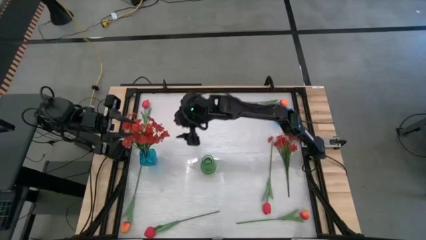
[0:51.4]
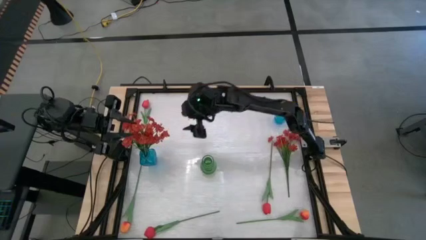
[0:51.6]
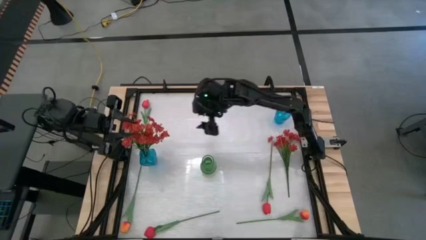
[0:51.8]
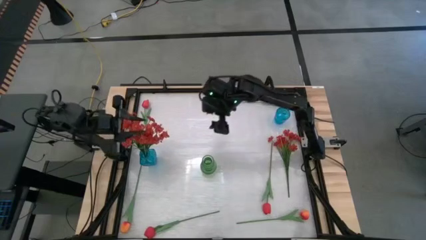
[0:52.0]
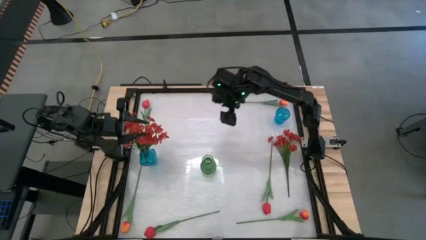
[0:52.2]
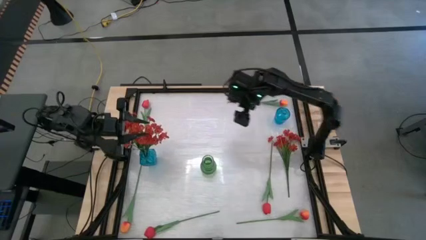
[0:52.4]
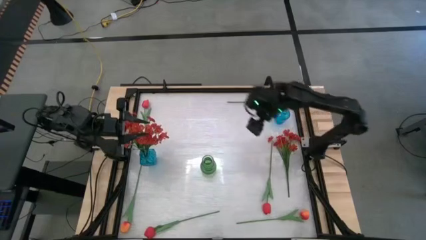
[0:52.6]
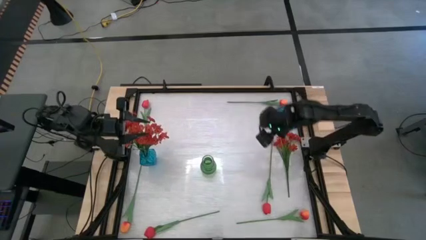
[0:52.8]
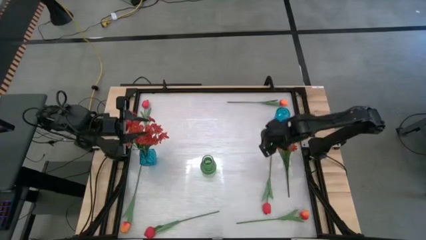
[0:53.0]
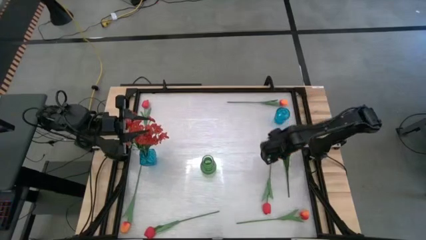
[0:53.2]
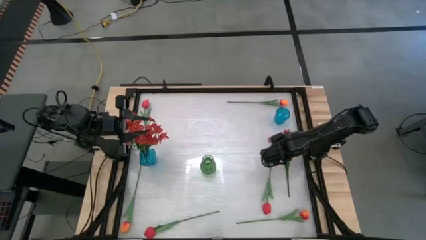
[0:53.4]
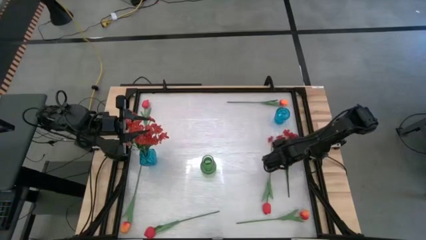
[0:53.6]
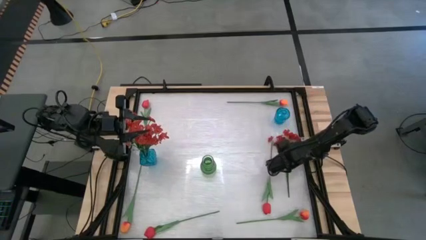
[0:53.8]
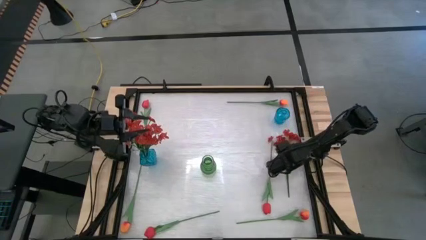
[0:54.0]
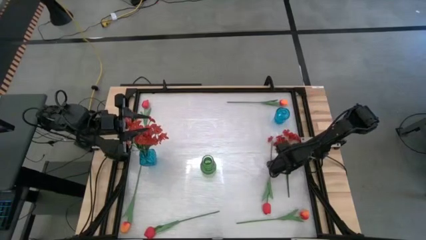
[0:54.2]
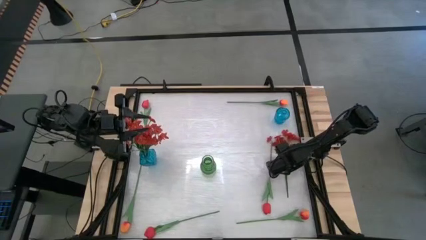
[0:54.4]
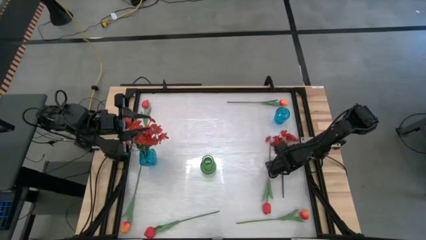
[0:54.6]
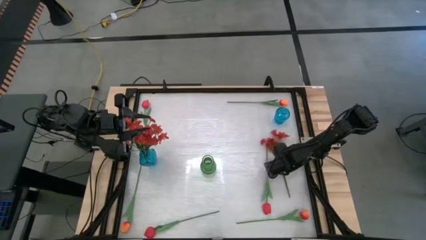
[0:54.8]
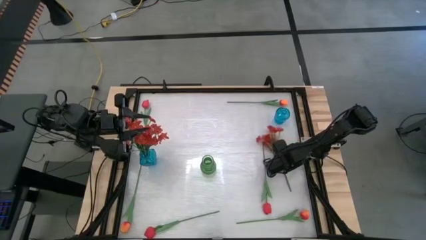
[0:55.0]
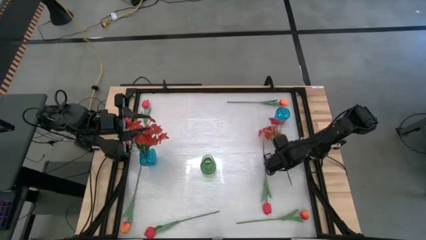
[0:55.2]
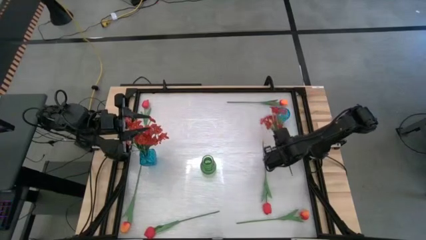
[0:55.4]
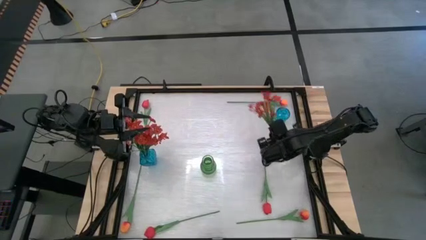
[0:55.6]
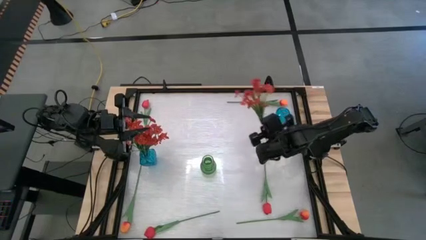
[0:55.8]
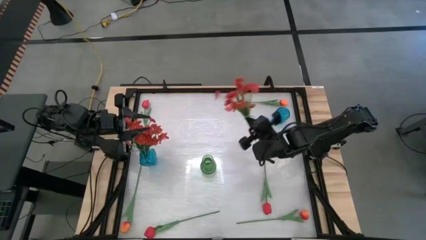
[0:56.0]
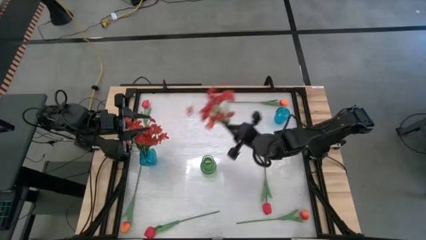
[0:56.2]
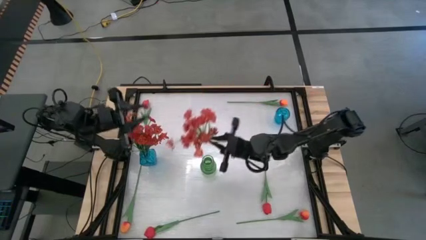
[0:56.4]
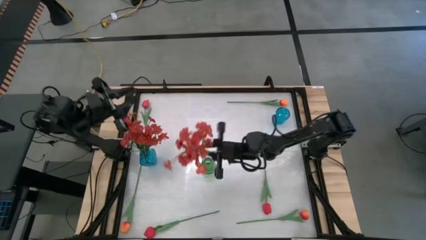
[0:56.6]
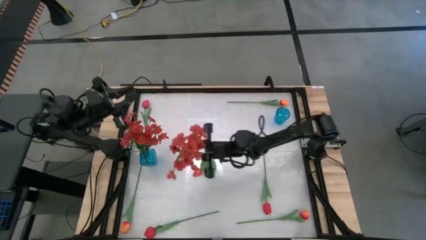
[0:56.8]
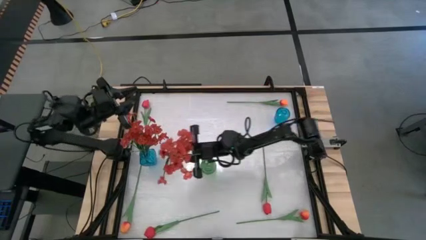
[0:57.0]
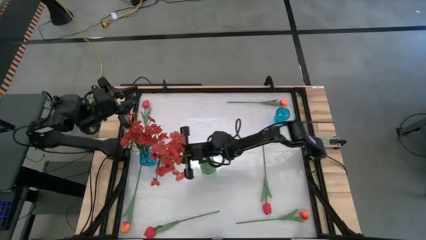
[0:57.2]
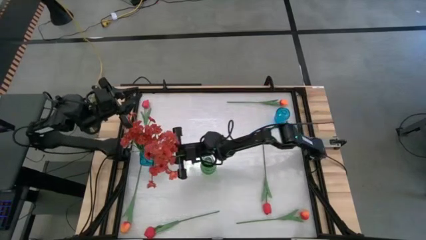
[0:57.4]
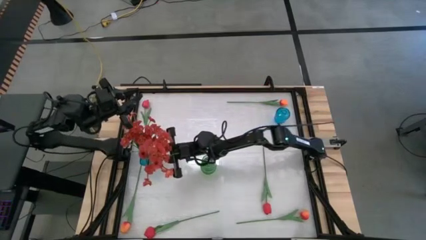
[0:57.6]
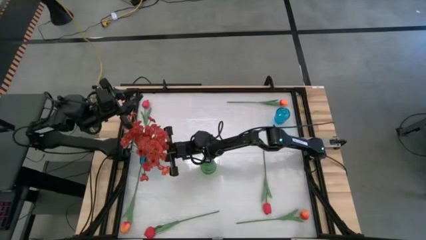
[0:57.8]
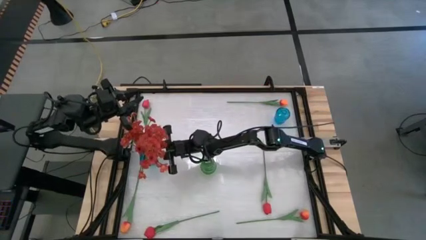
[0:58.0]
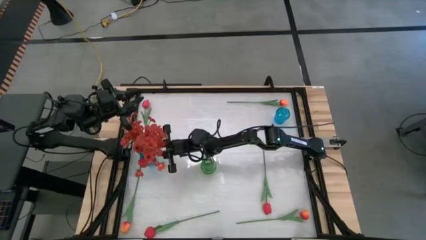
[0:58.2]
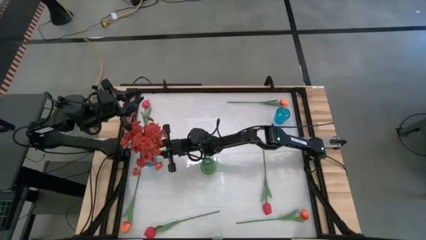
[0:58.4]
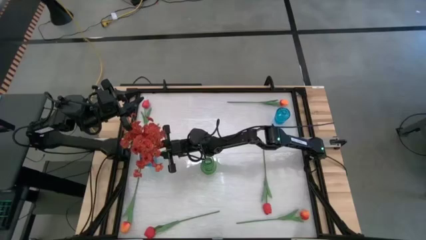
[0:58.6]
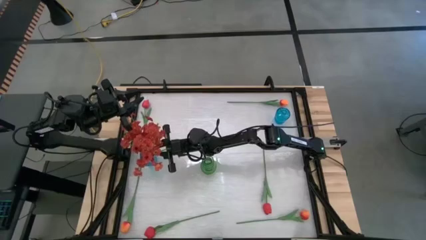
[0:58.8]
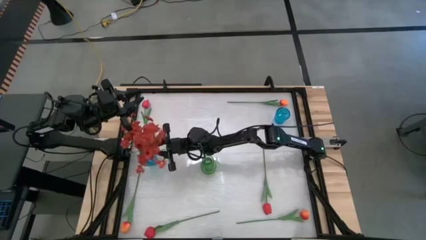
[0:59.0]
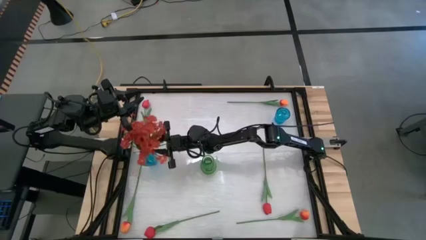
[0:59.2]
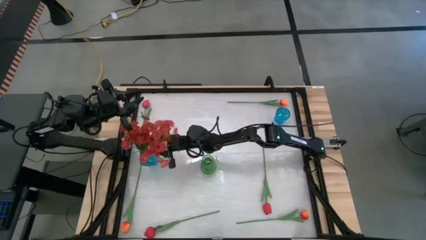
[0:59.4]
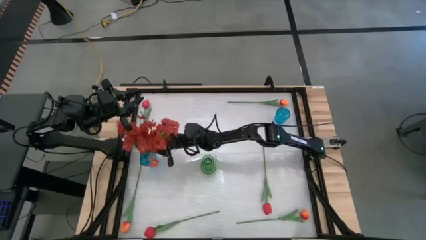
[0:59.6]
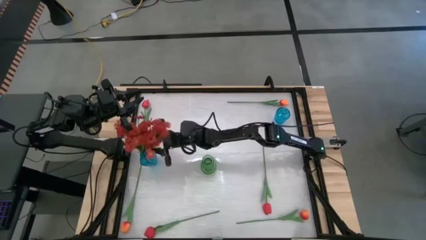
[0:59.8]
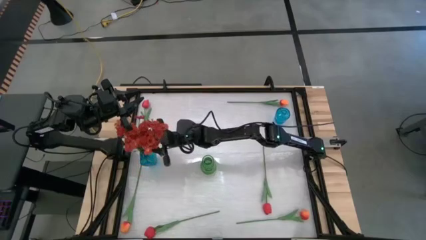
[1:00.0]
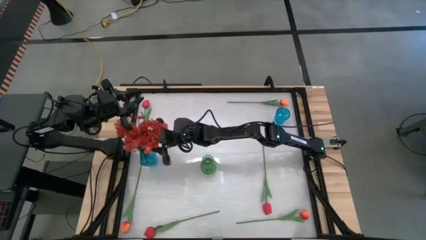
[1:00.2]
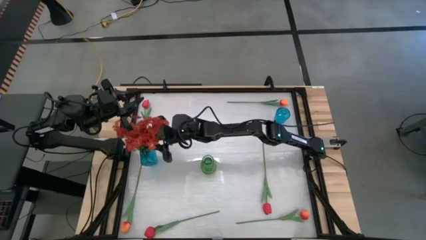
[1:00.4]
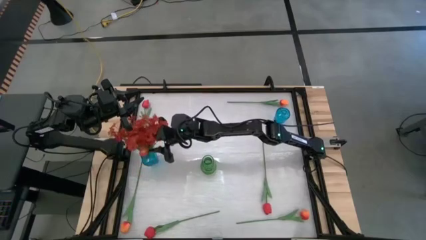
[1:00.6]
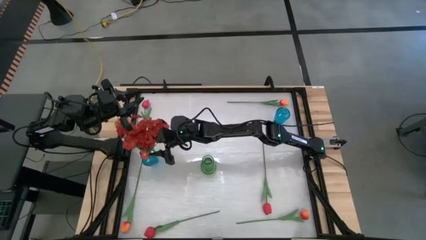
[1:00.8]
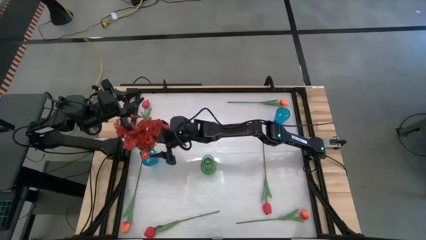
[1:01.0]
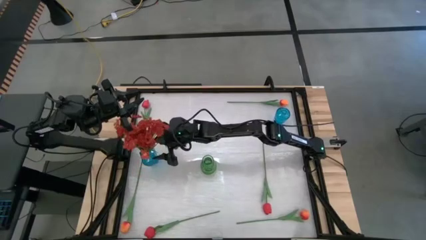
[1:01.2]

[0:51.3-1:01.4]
Task: Sort flowers into vase by color
Put the red flowers into the left blue vase

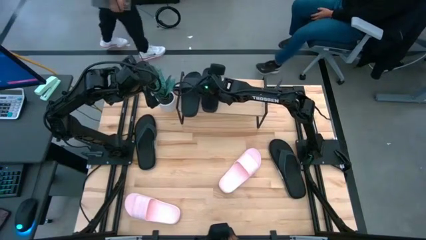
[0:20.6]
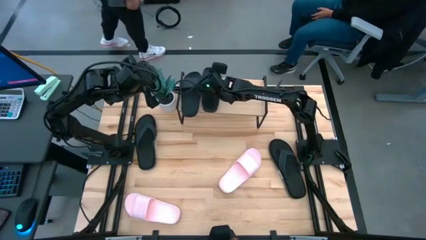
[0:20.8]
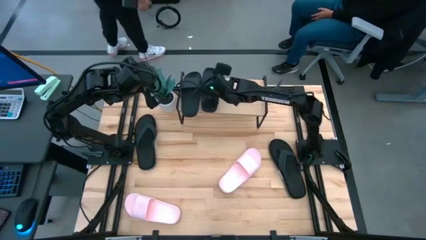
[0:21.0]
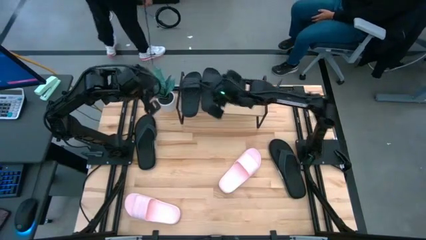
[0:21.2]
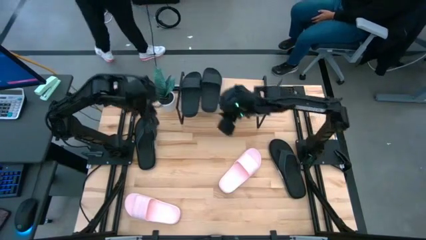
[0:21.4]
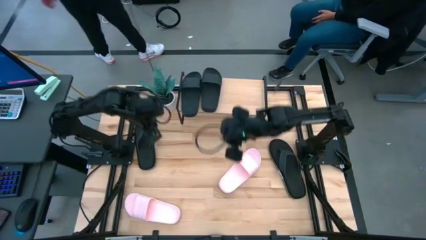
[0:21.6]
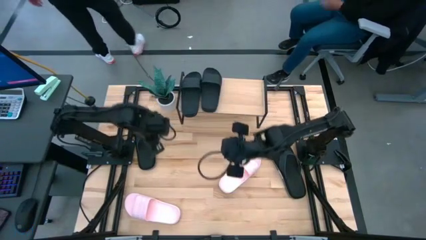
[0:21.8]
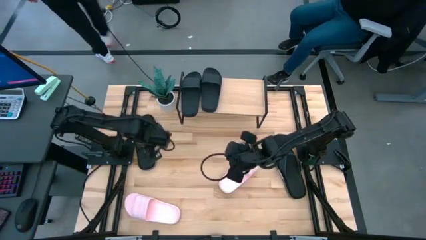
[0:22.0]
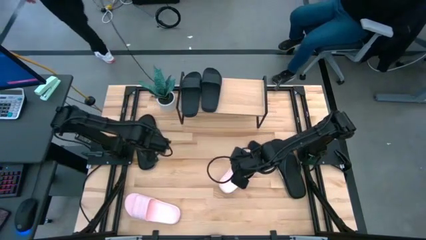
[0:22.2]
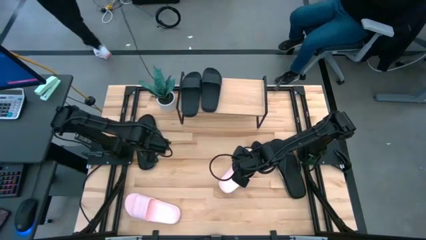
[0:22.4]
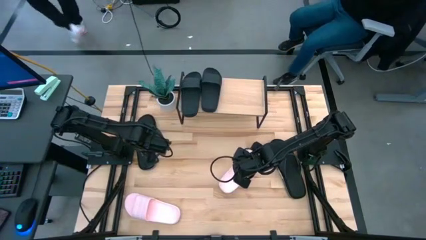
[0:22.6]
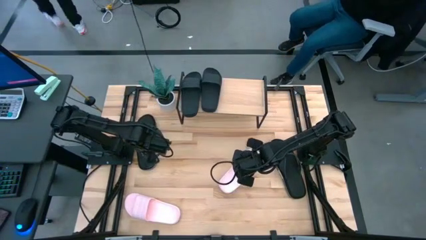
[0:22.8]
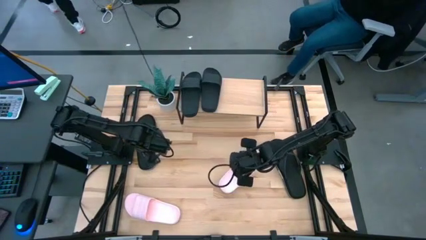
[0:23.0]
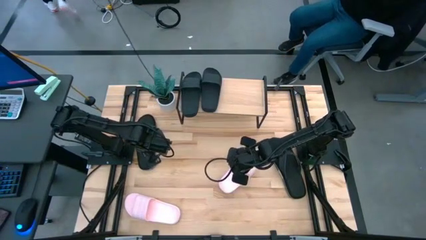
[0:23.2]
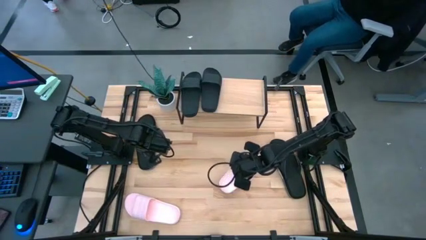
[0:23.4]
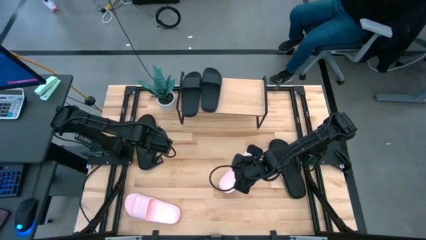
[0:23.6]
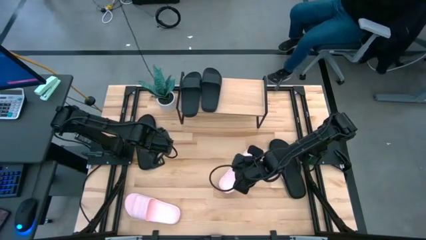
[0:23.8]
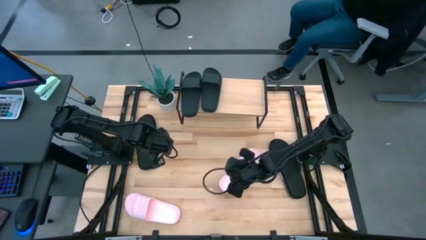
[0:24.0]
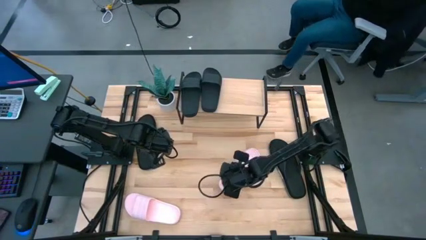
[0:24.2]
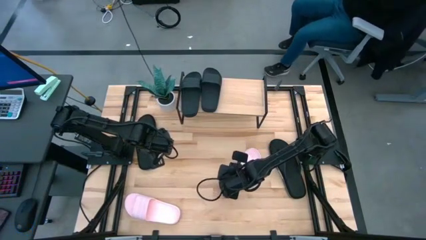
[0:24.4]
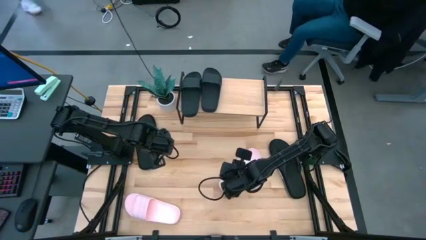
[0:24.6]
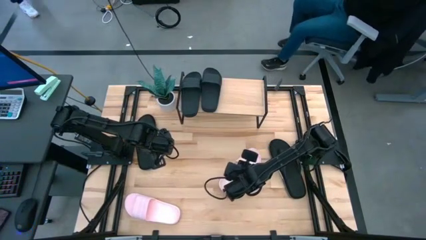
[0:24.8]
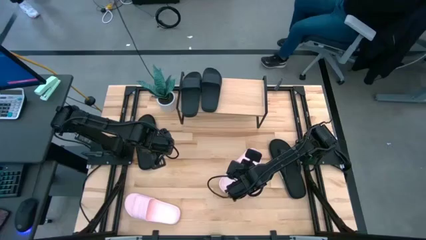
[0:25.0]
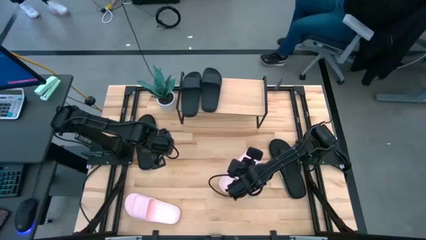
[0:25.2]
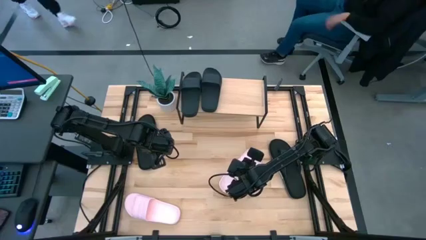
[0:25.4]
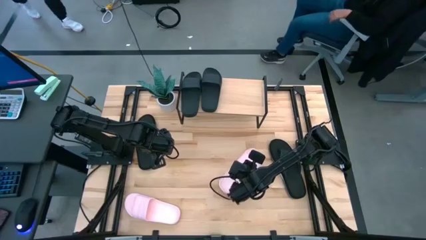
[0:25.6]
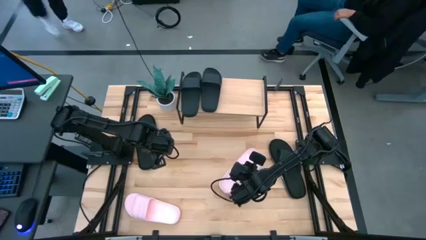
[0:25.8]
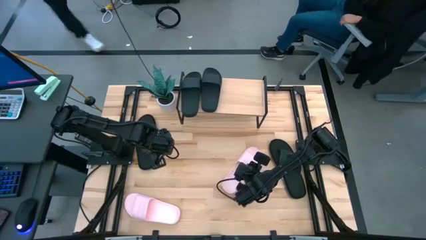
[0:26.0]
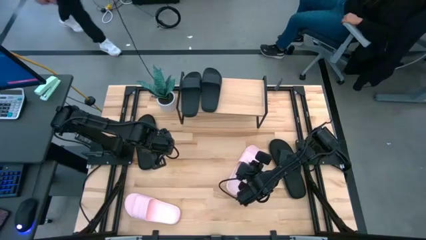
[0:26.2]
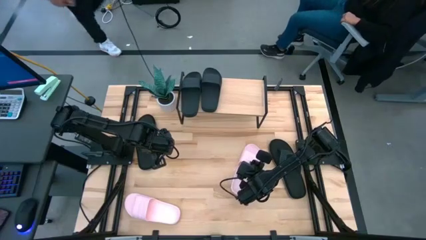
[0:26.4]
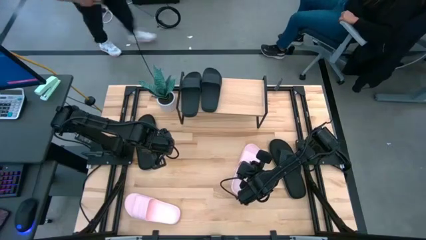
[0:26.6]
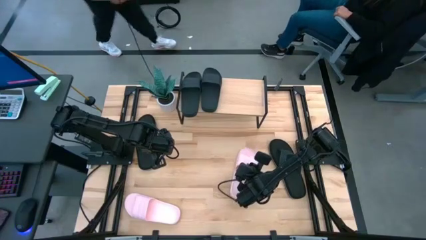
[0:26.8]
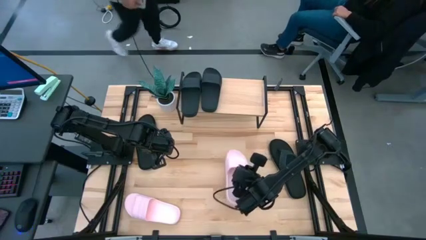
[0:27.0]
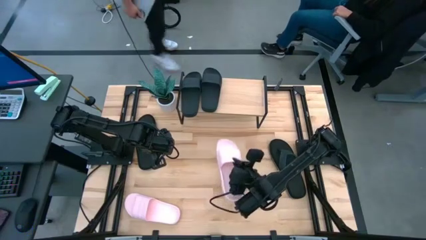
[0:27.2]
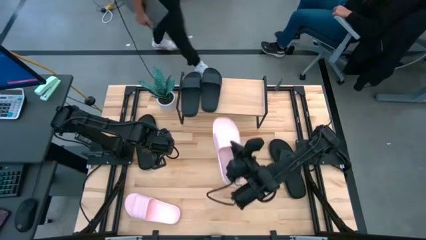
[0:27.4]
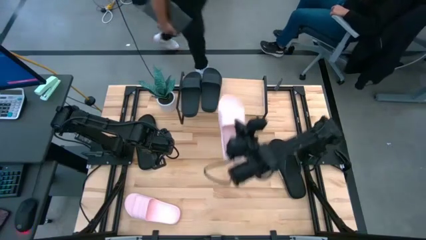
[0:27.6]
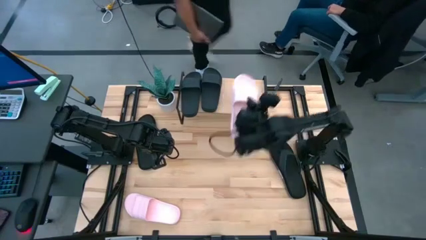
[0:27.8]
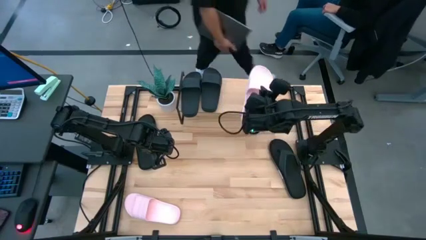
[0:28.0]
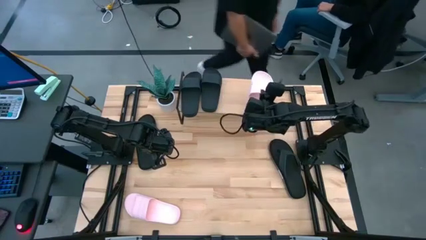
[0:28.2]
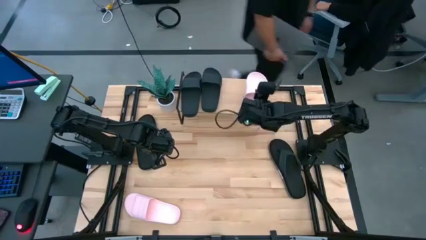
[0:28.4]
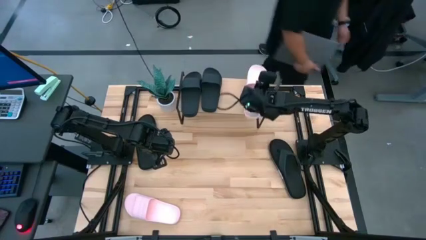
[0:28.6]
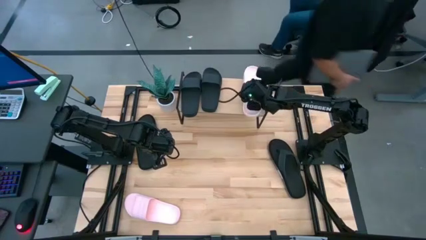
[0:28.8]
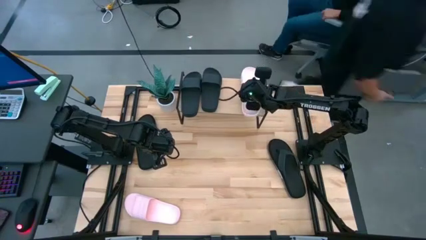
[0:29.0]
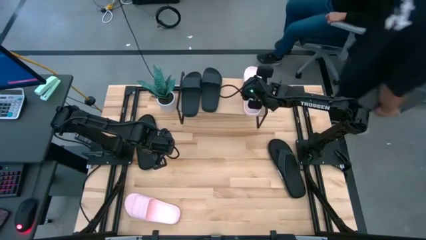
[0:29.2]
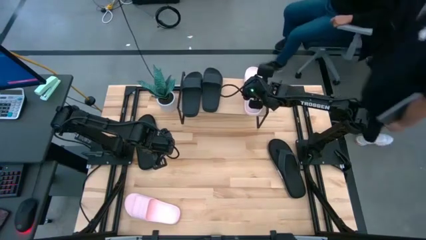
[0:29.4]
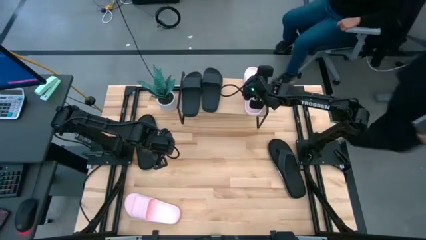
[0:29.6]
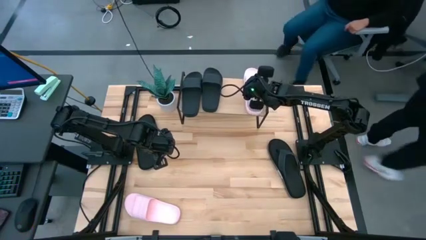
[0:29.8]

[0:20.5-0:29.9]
Task: Pick and place slides into the shelf
Put the right pink slide on the shelf
